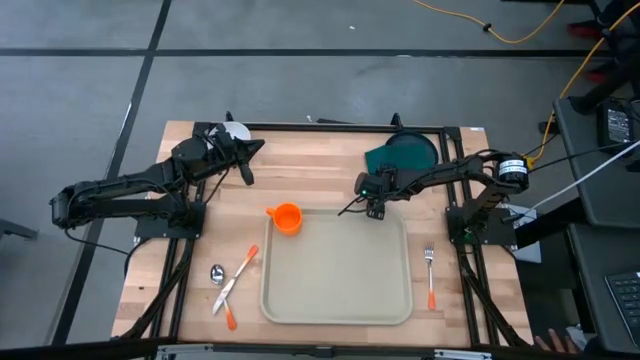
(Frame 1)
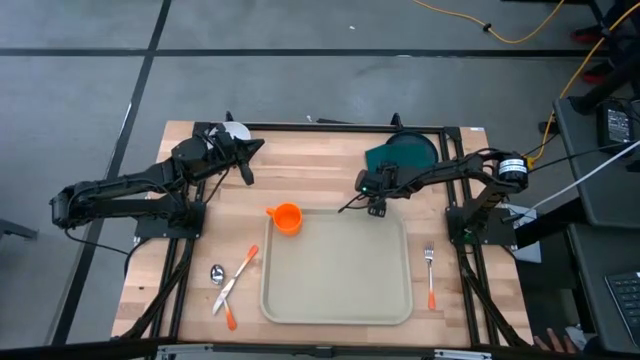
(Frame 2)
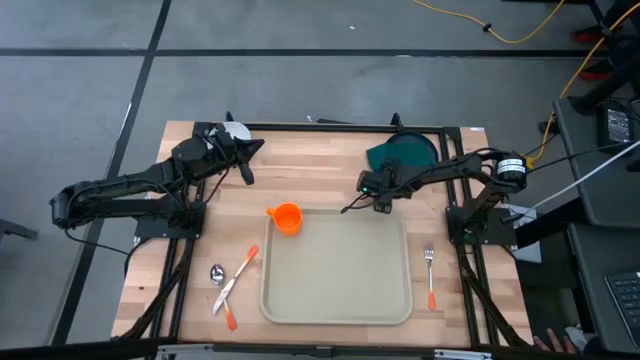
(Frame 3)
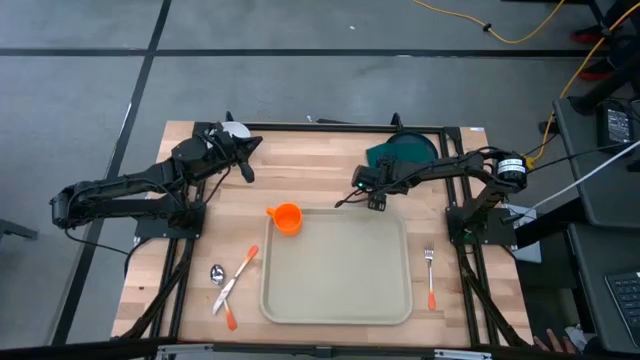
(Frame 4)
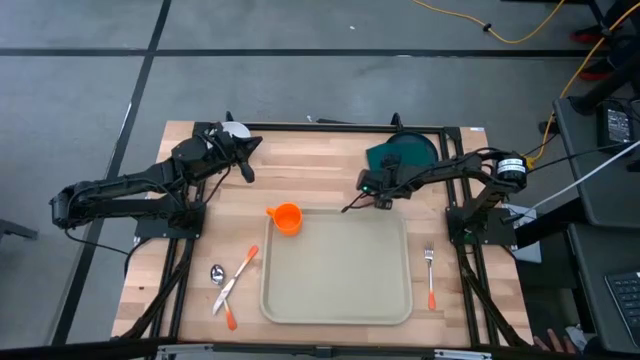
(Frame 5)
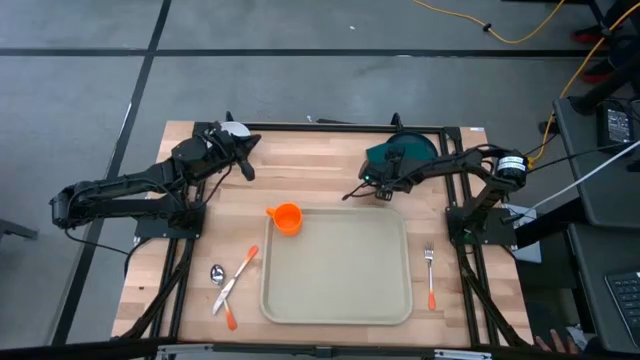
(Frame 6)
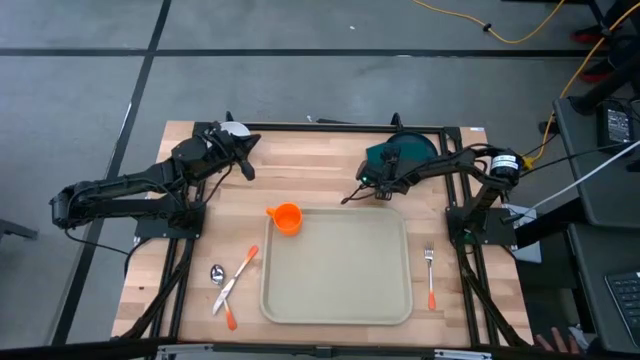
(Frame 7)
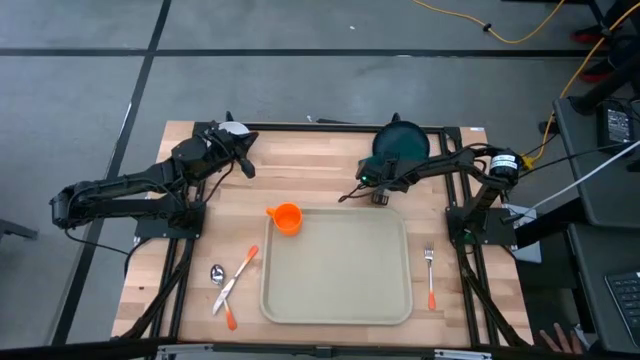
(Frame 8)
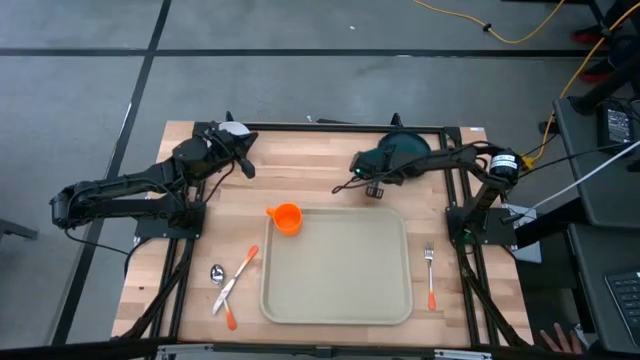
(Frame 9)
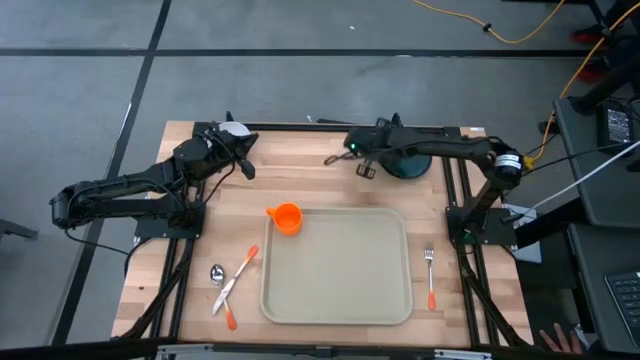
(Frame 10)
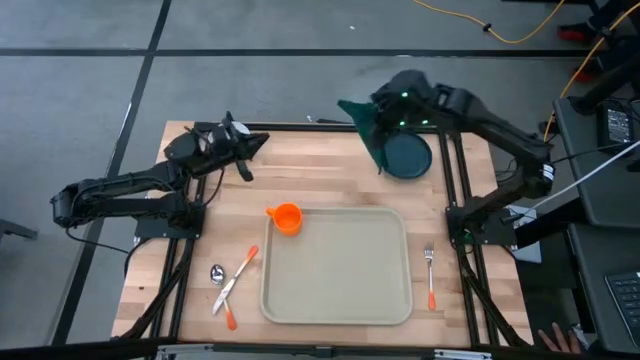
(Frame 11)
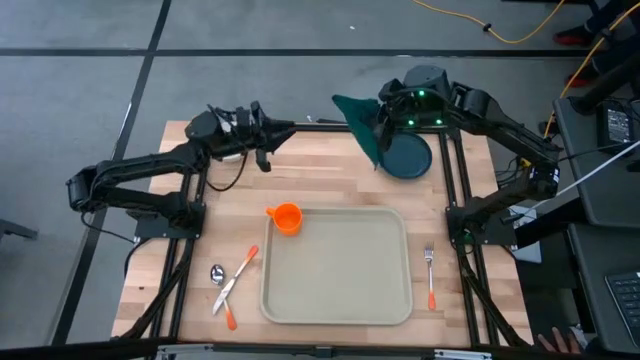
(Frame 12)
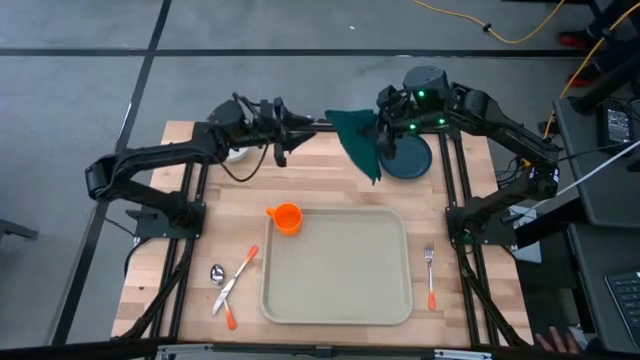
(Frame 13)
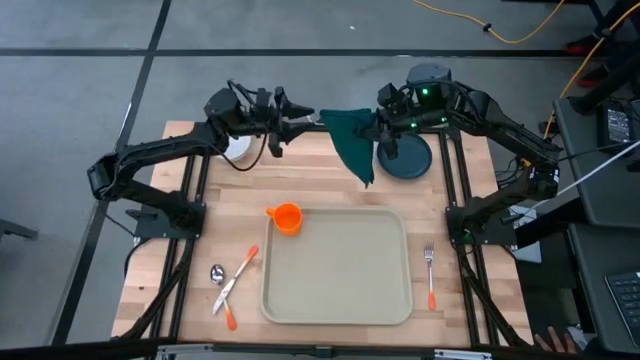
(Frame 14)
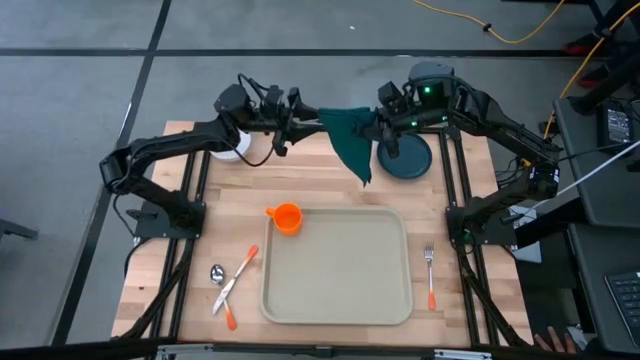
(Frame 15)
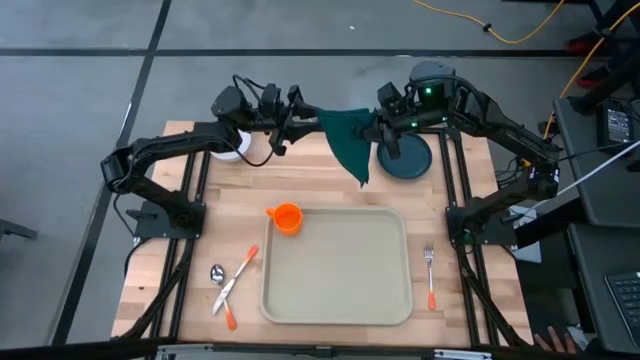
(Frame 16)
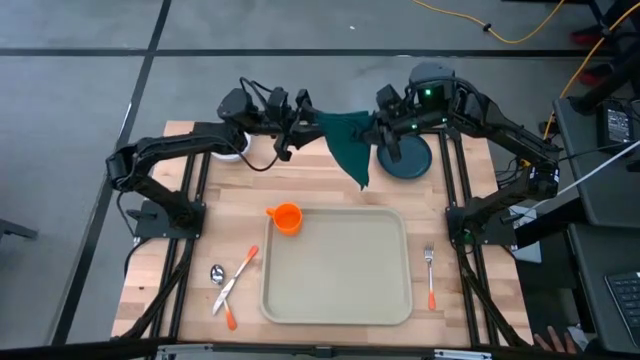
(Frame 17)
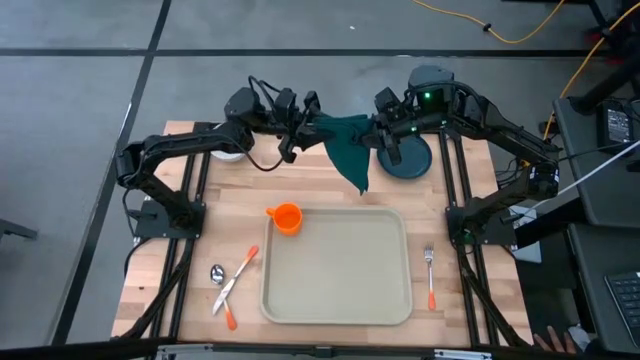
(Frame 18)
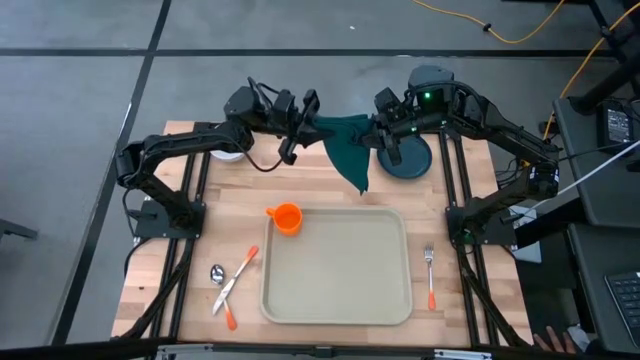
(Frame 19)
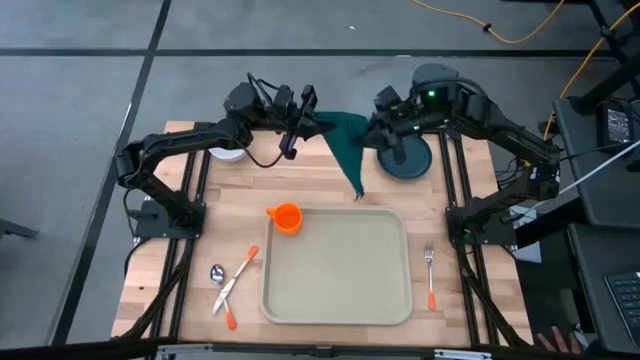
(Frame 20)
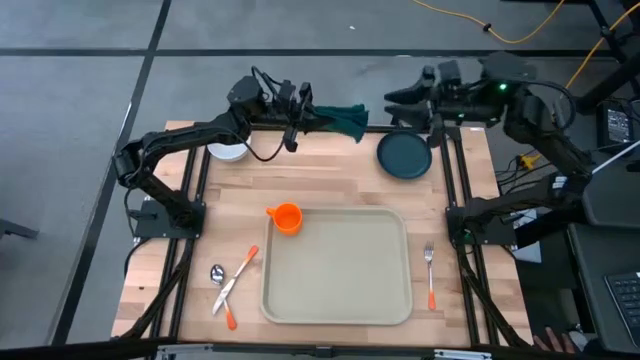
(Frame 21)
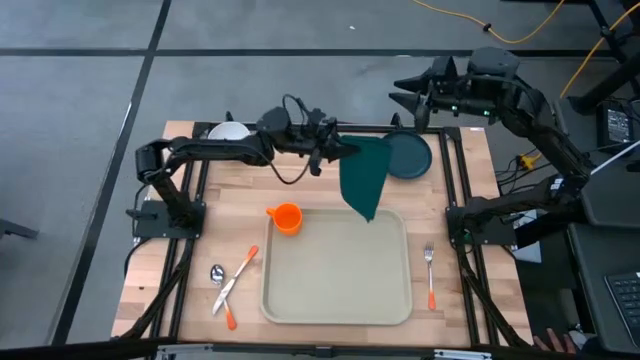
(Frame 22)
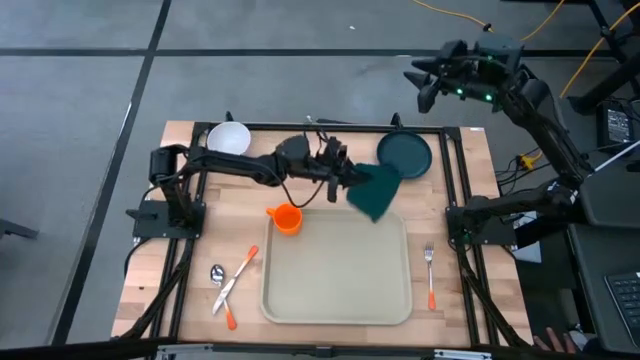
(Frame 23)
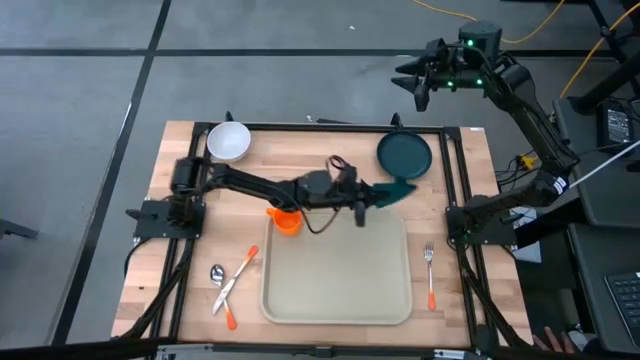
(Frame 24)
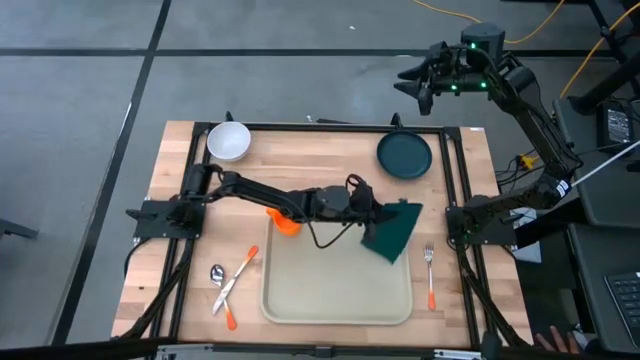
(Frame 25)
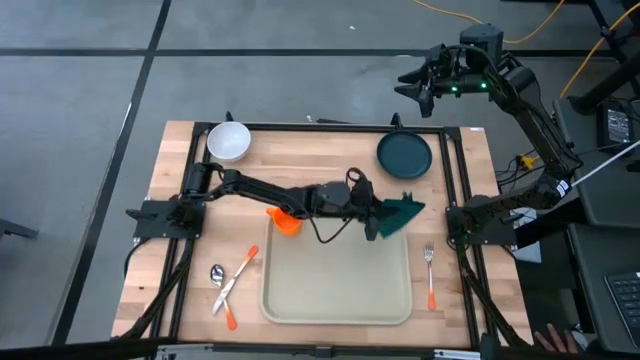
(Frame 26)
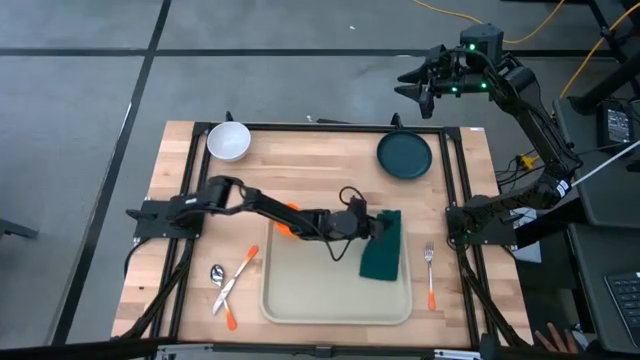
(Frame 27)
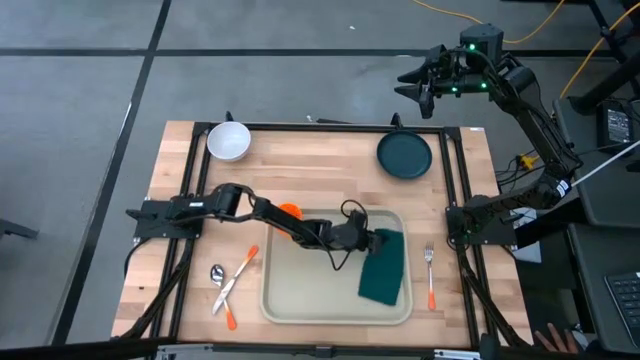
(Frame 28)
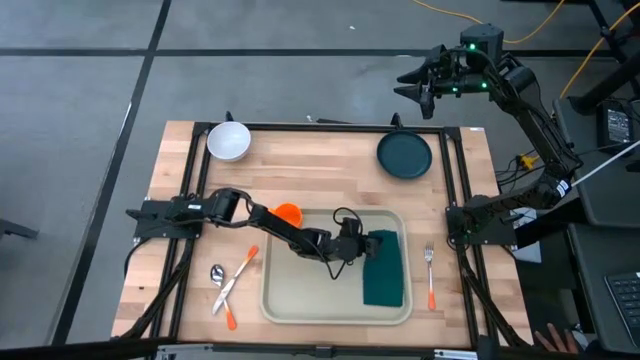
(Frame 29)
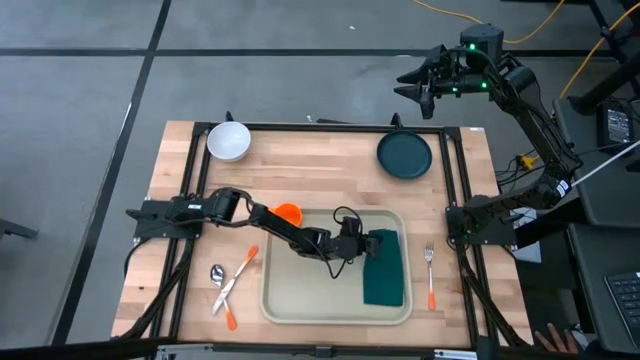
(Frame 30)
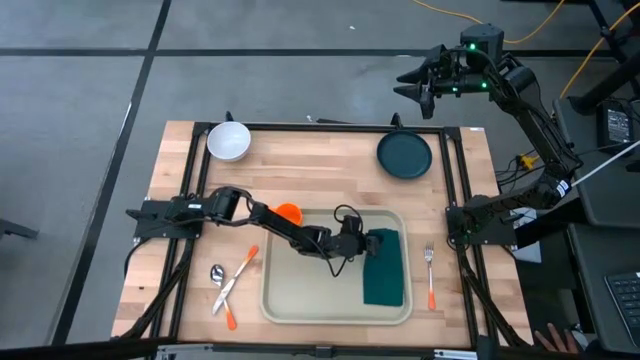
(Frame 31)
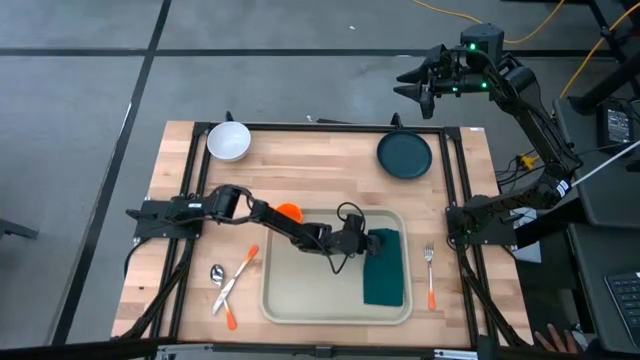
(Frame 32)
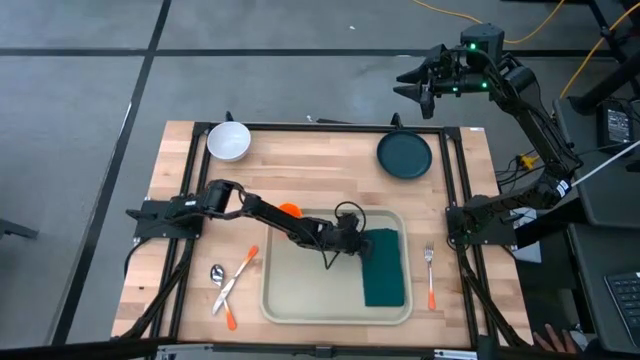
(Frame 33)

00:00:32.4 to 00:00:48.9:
Task: Set up tray
Put the green napkin on the serving tray to the right of the orange mug

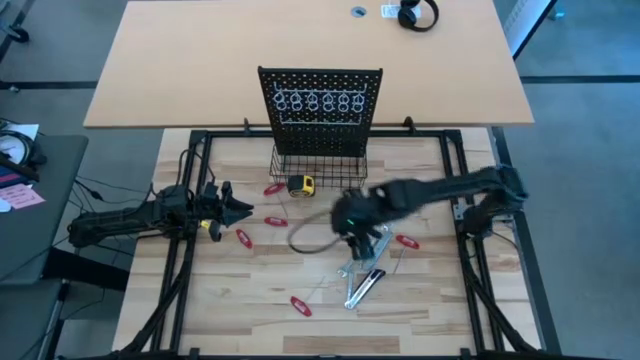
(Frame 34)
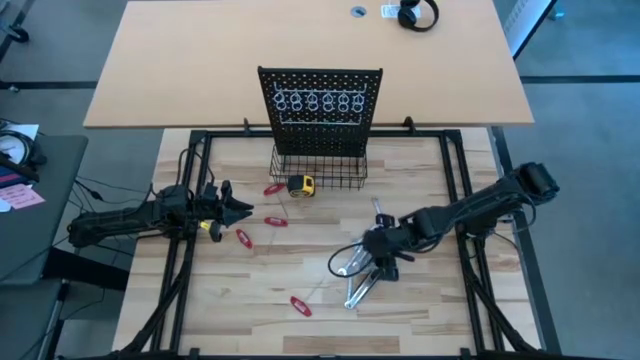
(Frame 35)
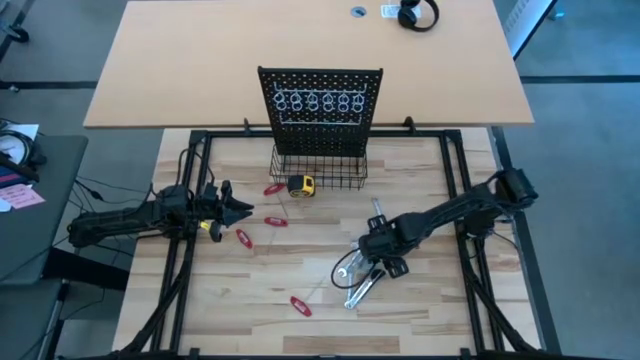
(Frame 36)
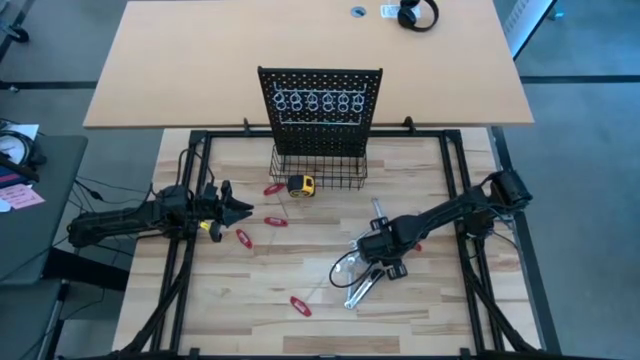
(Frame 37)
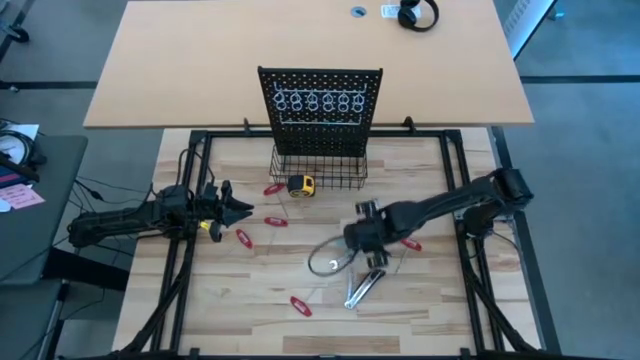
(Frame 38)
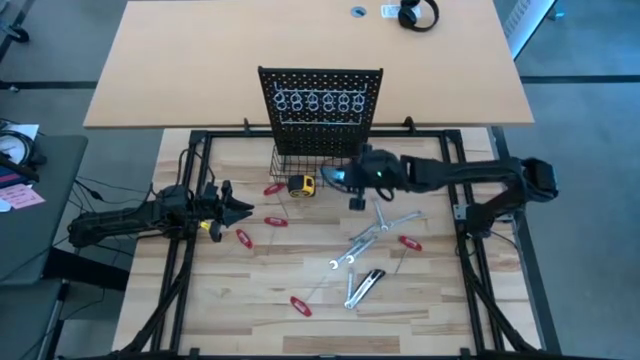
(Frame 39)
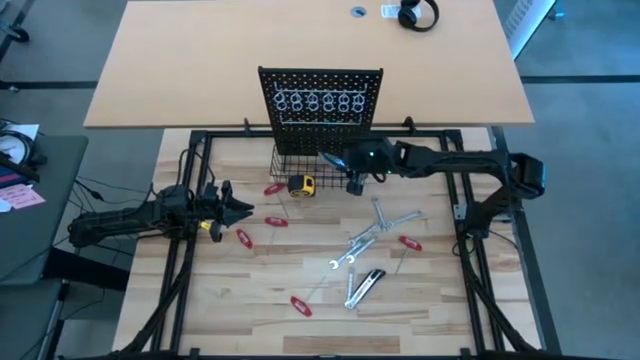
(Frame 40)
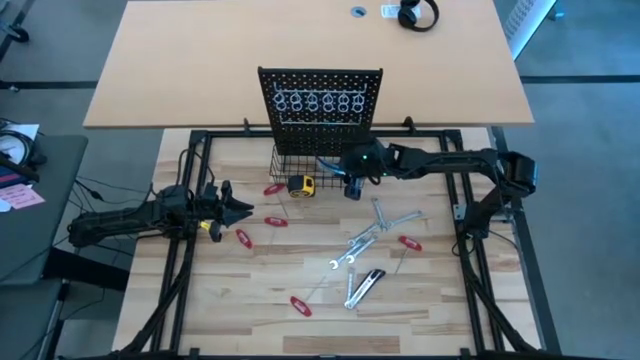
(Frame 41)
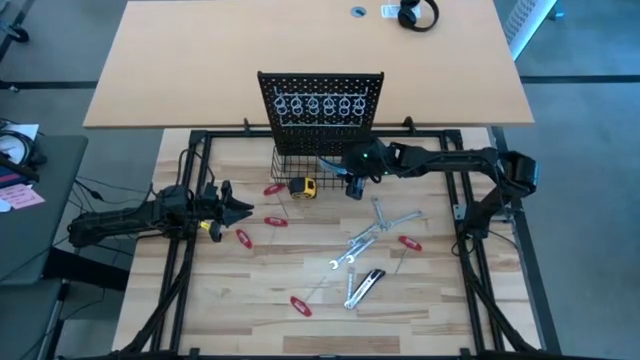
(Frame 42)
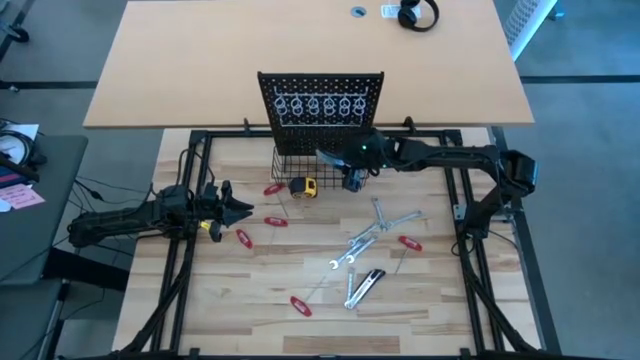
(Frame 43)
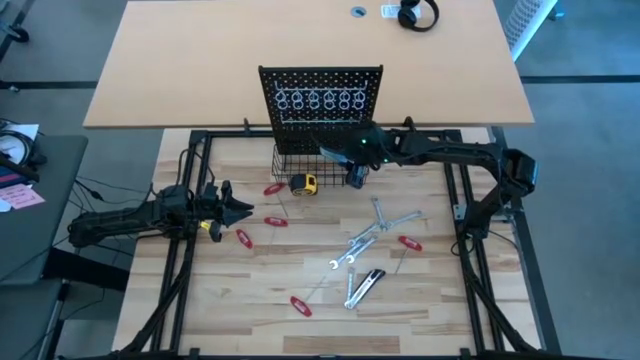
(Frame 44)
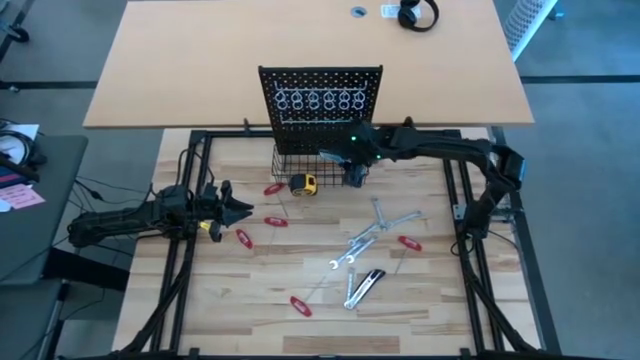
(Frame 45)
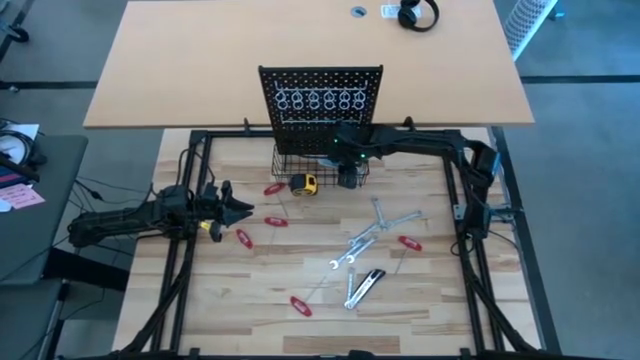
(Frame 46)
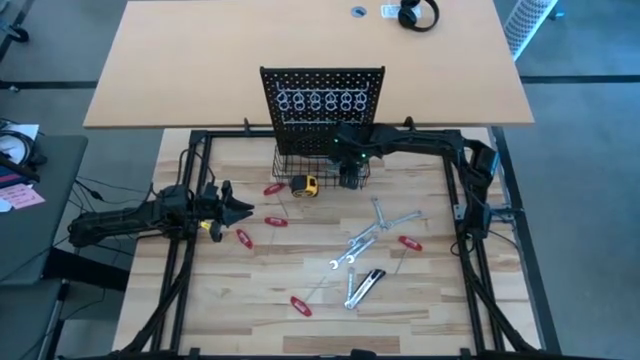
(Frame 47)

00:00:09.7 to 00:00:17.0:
Task: Hang tools onto peg board
Put the cutter into the pegboard
